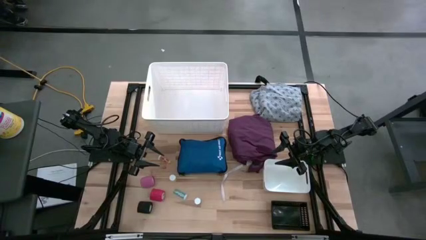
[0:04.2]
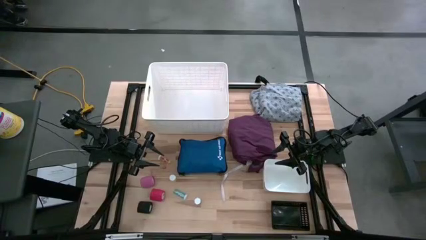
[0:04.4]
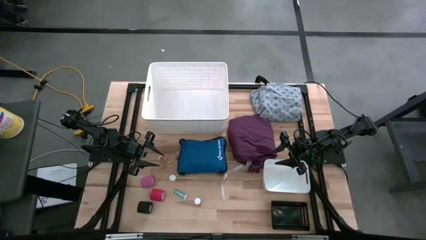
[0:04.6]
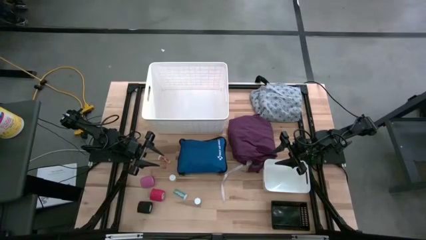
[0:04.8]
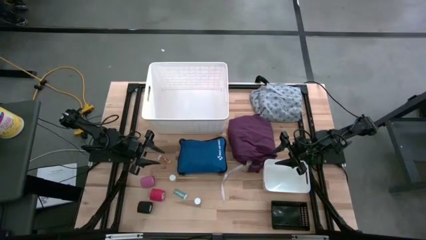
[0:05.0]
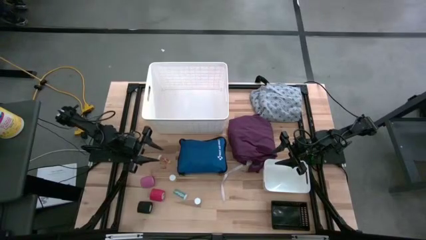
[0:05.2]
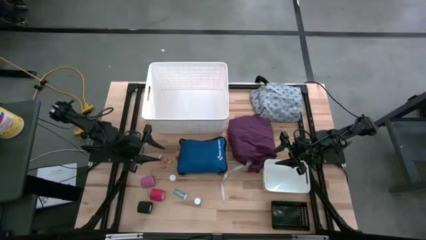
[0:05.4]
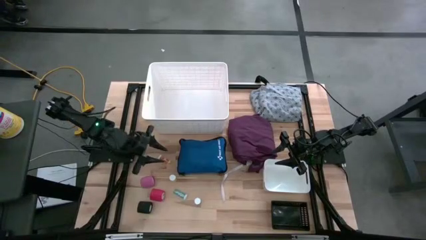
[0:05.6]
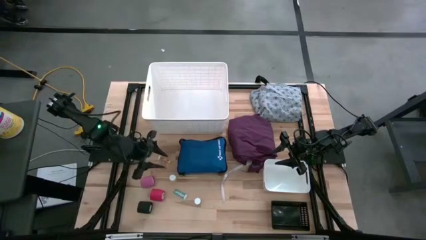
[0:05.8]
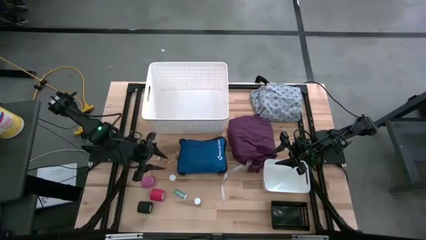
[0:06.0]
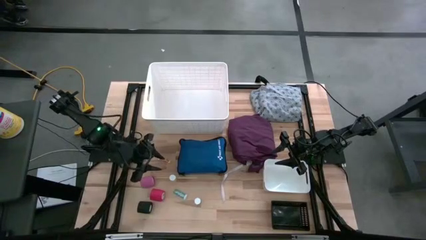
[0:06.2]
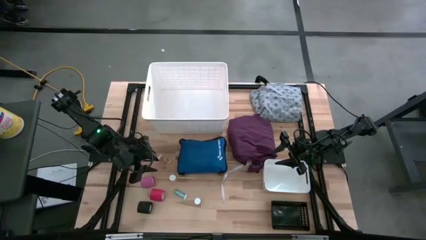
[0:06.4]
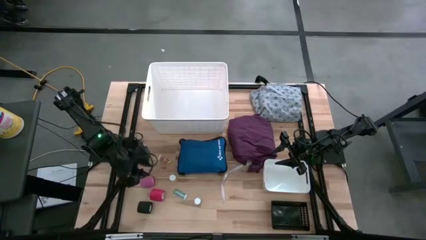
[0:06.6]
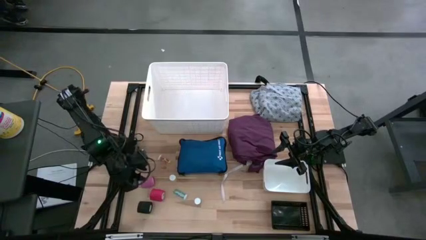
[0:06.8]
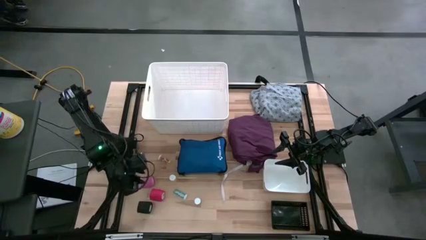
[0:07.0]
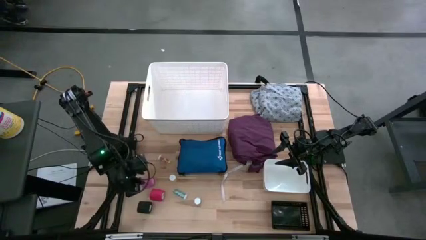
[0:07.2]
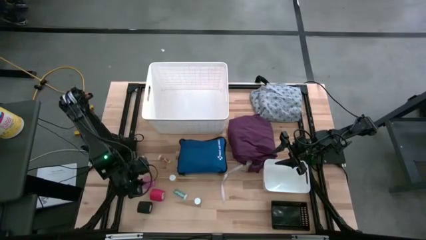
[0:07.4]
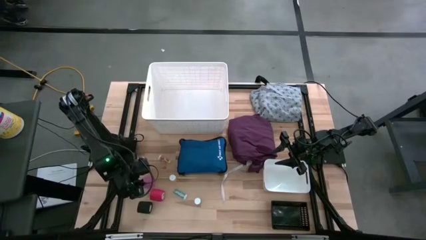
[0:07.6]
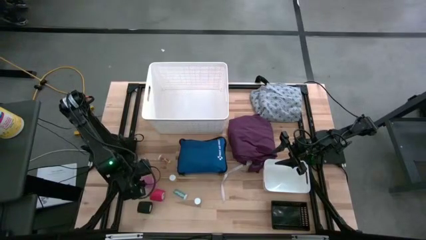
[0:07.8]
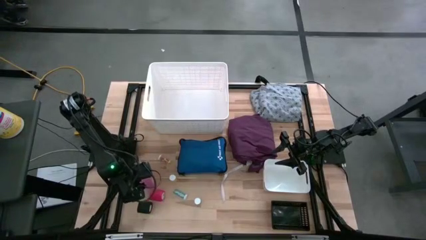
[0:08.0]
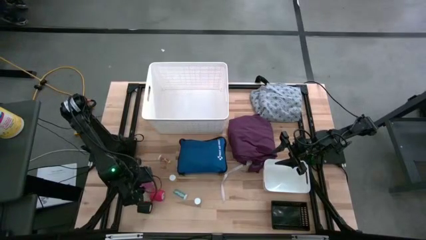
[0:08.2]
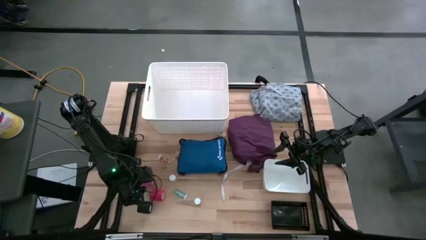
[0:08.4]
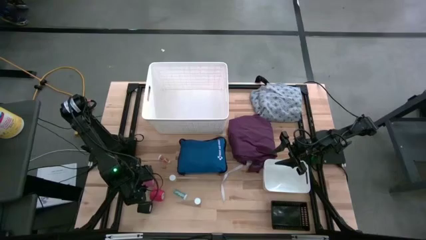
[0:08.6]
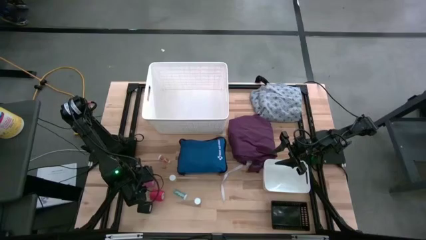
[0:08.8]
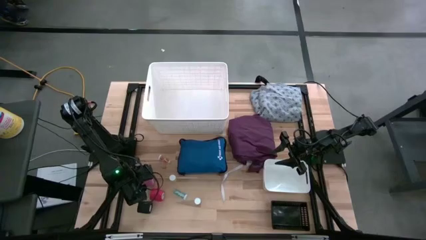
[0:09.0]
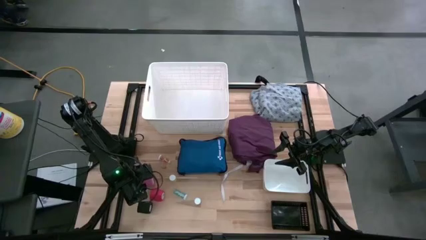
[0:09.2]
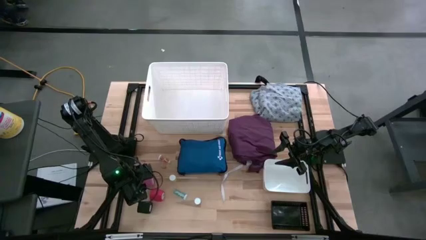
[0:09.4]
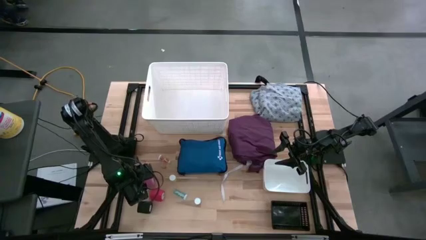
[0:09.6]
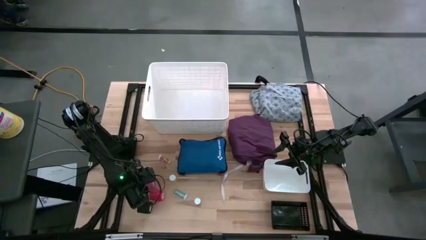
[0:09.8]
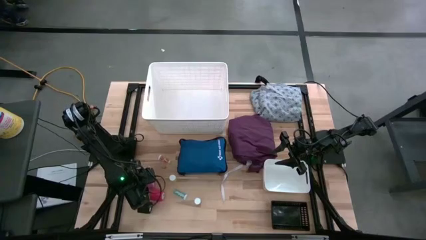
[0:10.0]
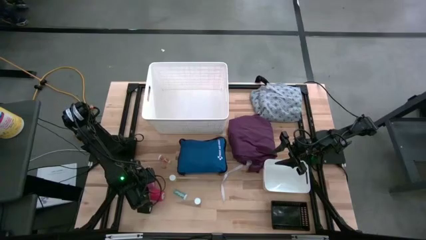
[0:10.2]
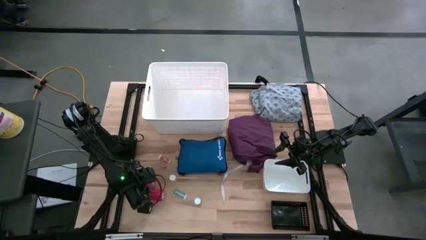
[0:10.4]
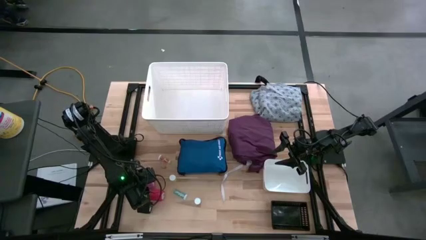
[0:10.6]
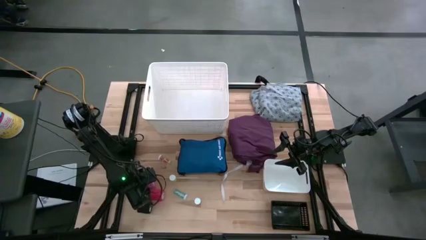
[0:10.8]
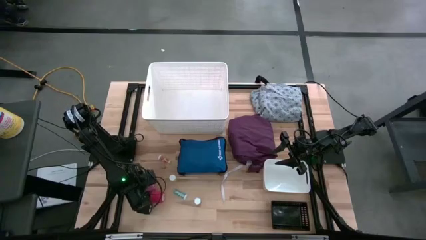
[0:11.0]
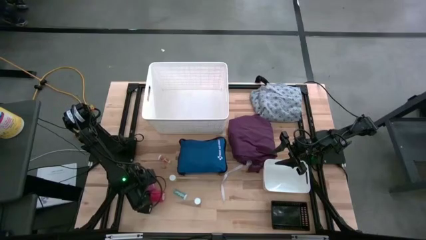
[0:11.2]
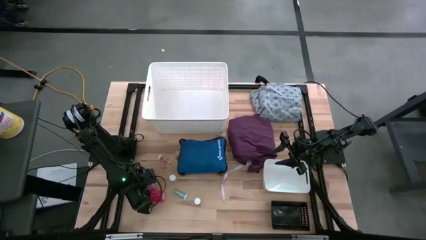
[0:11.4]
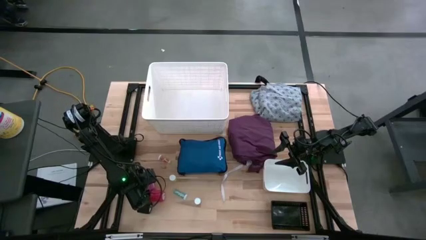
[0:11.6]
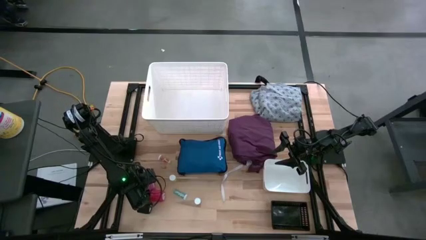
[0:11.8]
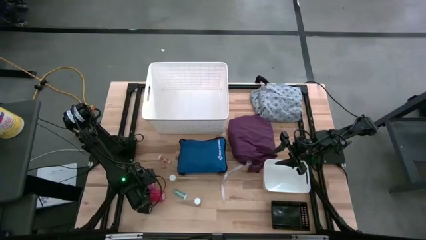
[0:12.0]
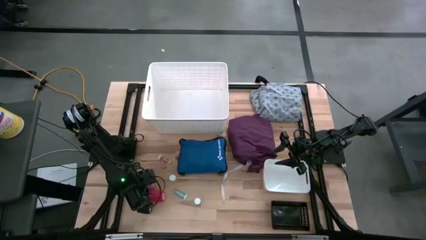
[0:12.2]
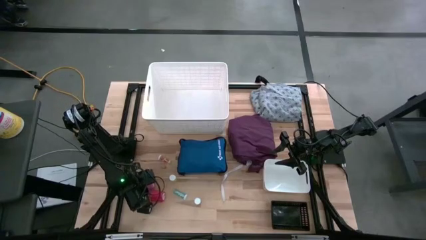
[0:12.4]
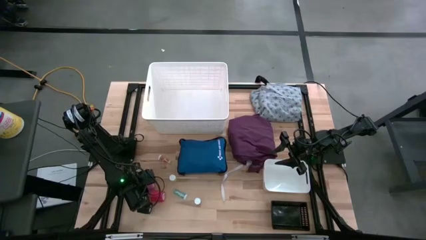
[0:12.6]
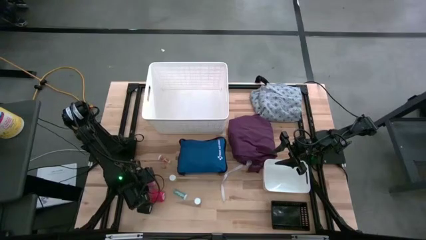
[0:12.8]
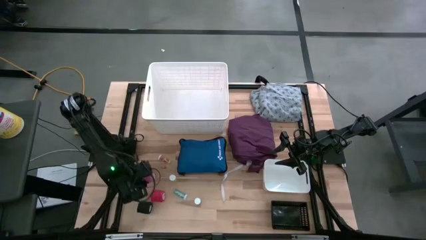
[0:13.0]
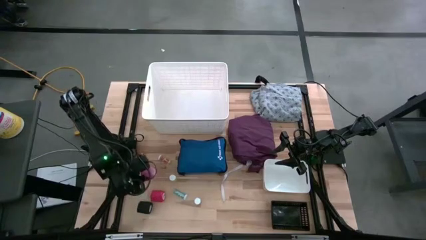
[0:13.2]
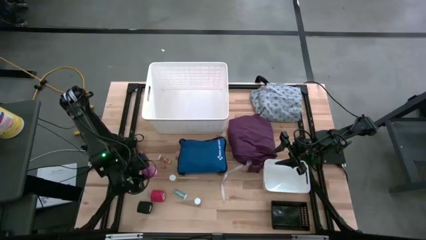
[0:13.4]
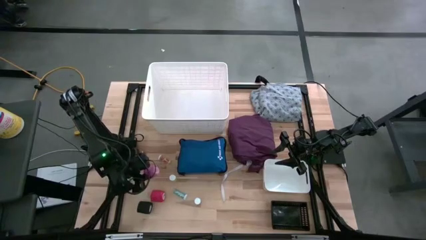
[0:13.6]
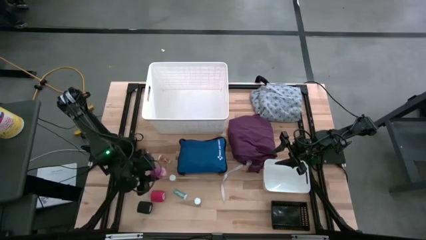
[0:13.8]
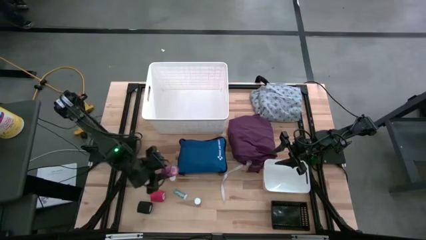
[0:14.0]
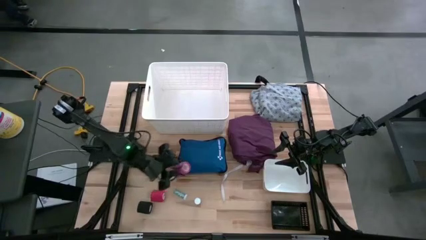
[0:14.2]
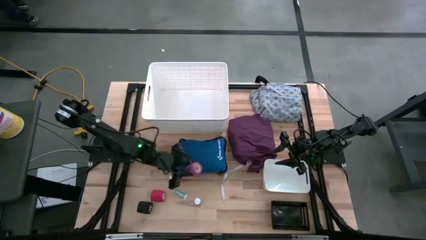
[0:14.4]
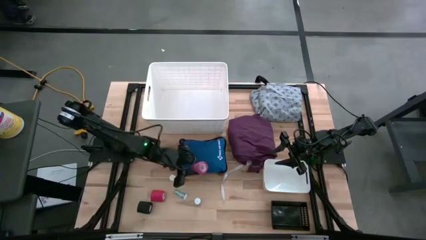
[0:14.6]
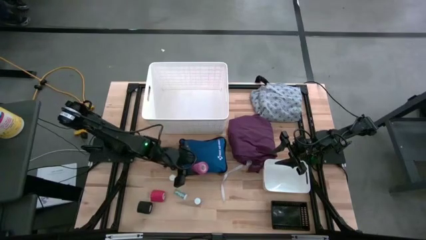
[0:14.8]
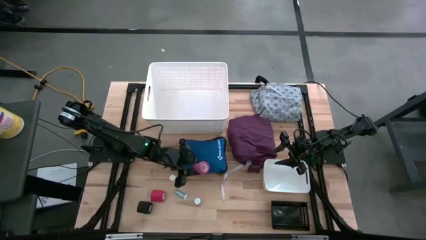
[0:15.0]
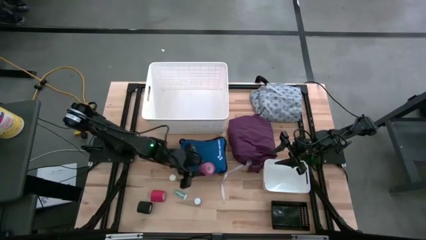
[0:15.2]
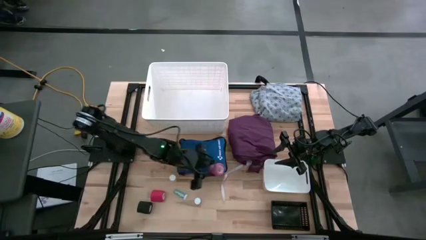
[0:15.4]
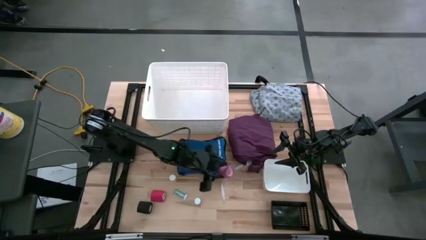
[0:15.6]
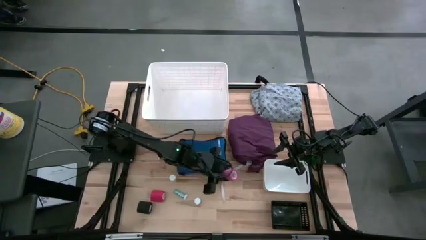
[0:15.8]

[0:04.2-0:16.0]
Task: Pick & Place Medicine items
Put the pink bandage into the white bin
